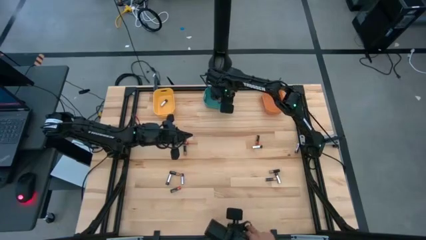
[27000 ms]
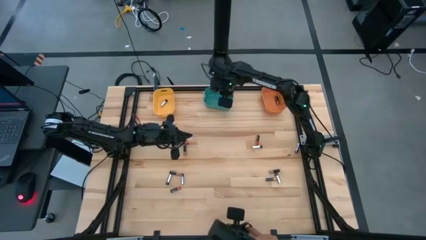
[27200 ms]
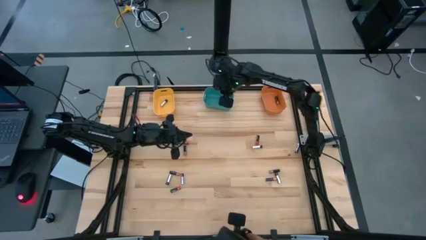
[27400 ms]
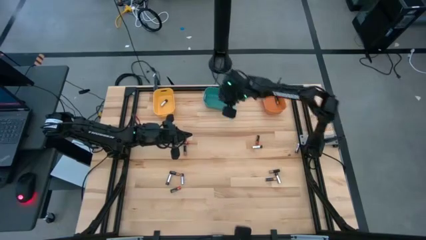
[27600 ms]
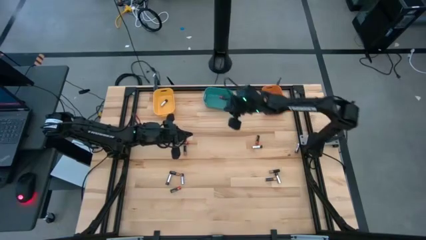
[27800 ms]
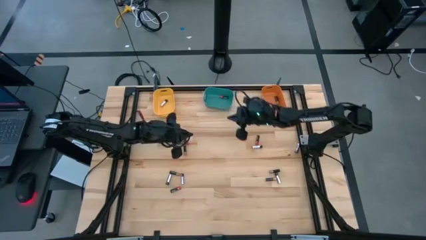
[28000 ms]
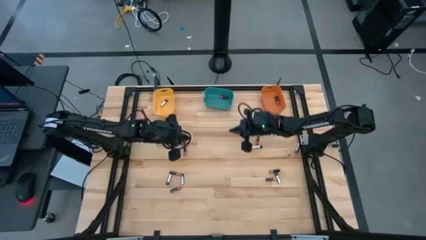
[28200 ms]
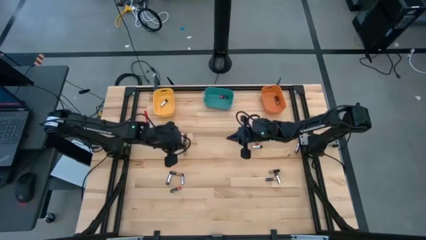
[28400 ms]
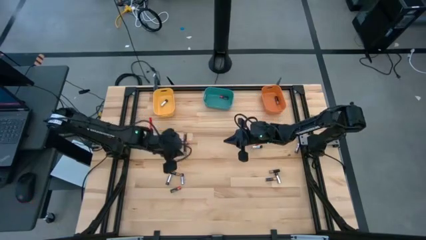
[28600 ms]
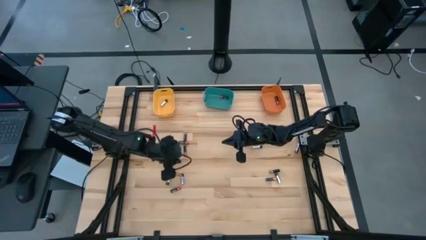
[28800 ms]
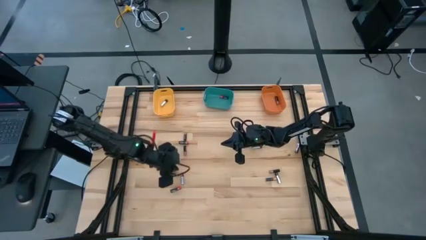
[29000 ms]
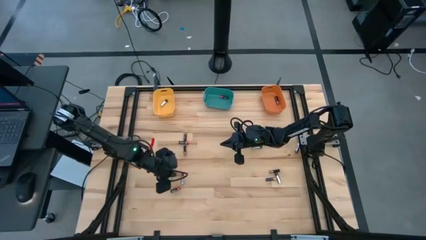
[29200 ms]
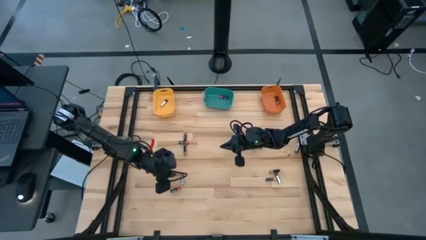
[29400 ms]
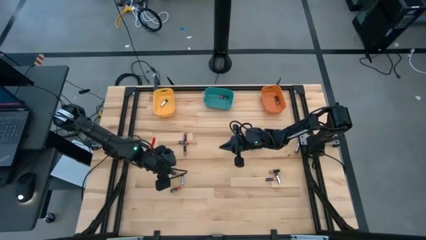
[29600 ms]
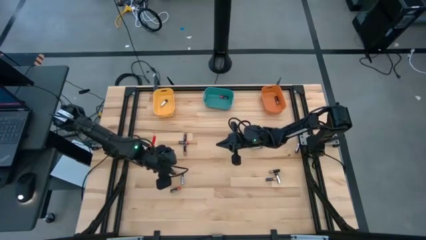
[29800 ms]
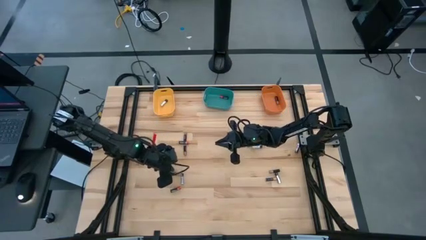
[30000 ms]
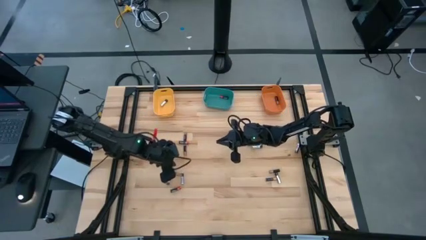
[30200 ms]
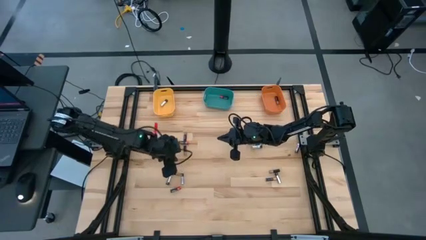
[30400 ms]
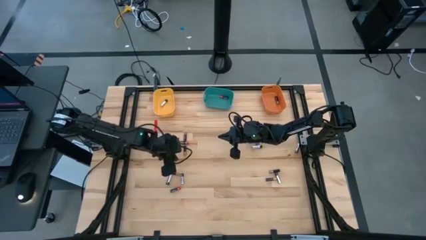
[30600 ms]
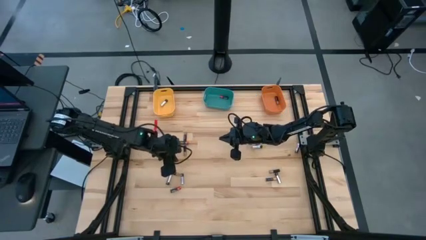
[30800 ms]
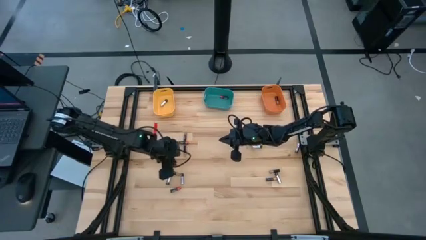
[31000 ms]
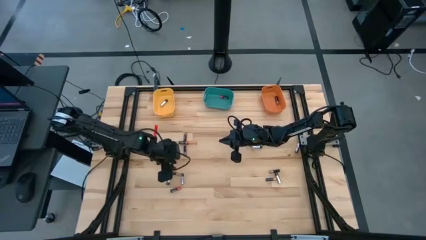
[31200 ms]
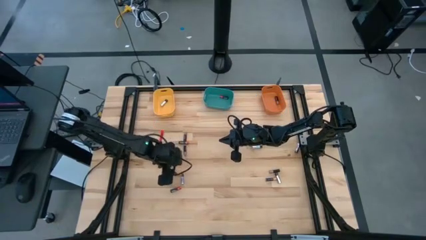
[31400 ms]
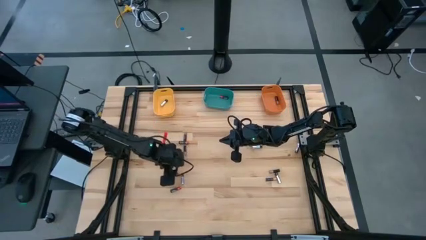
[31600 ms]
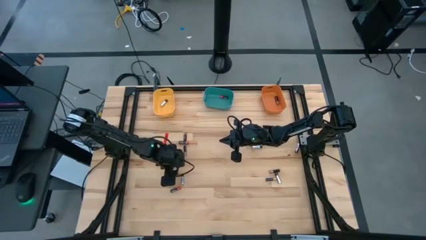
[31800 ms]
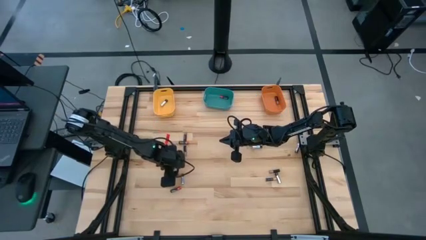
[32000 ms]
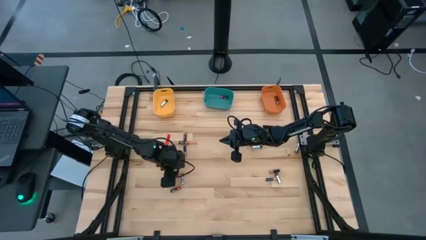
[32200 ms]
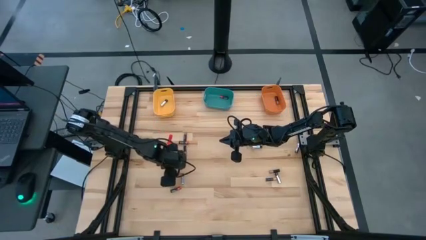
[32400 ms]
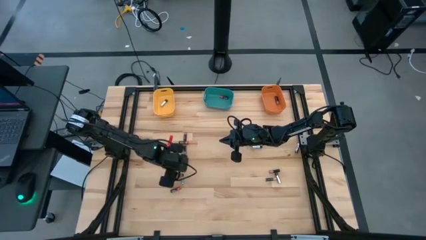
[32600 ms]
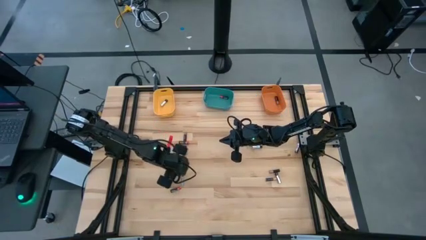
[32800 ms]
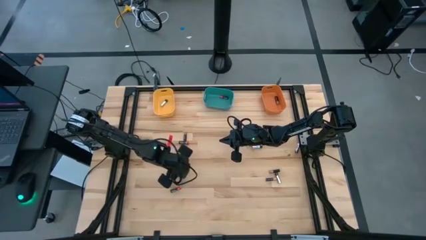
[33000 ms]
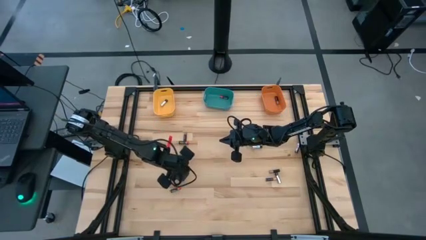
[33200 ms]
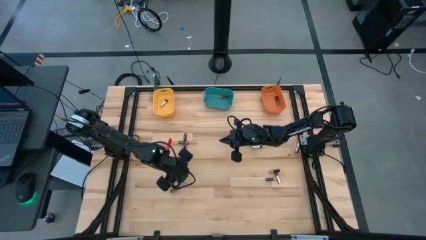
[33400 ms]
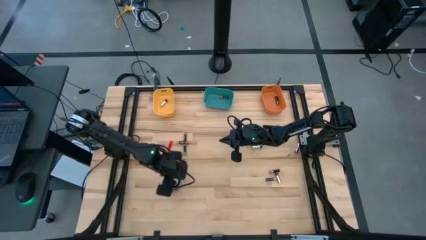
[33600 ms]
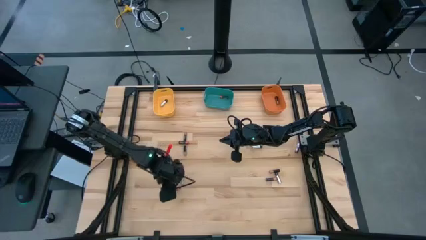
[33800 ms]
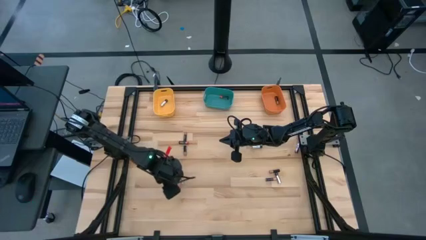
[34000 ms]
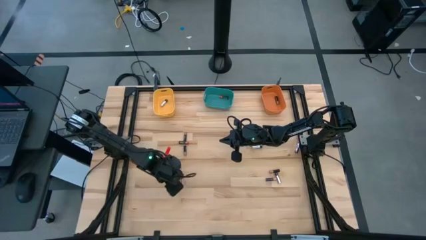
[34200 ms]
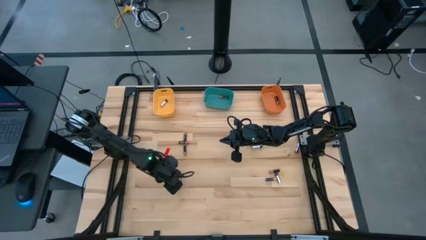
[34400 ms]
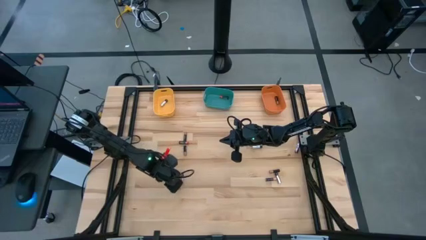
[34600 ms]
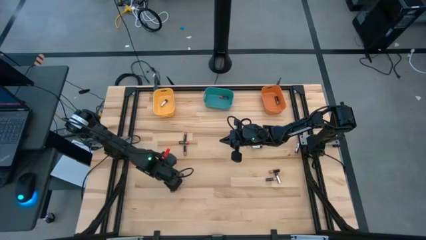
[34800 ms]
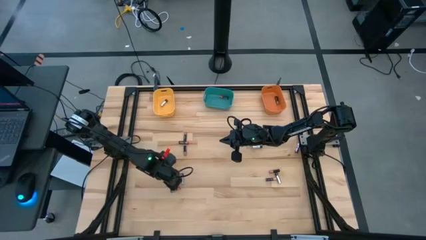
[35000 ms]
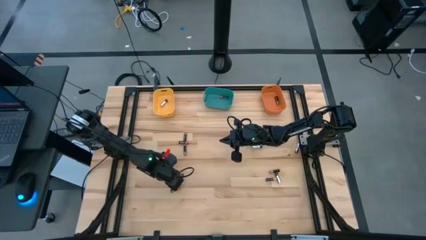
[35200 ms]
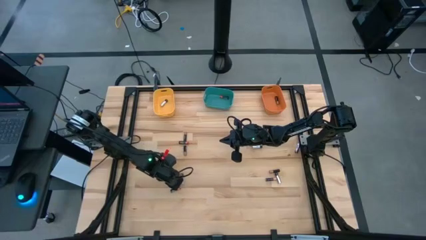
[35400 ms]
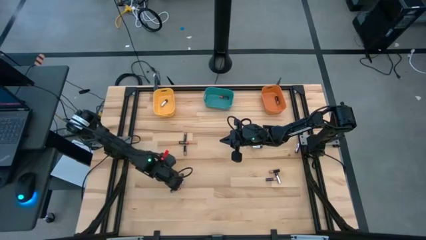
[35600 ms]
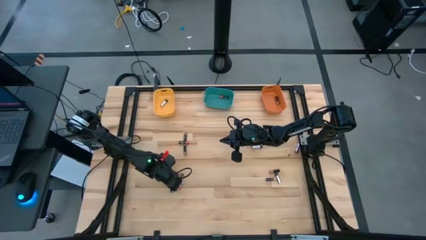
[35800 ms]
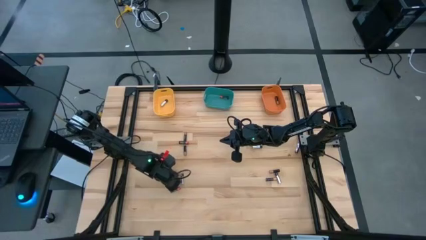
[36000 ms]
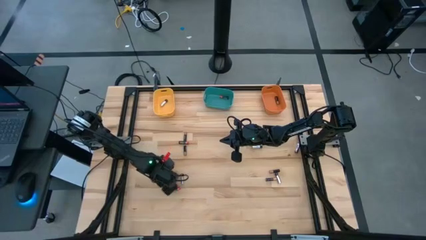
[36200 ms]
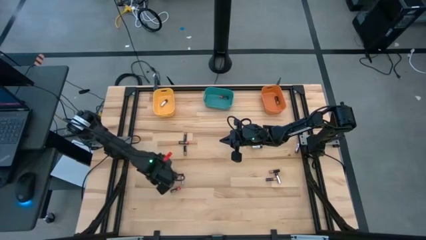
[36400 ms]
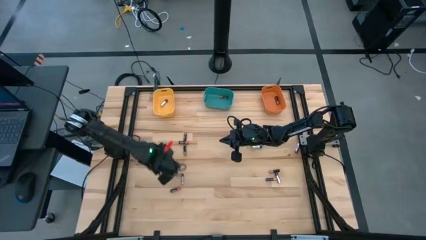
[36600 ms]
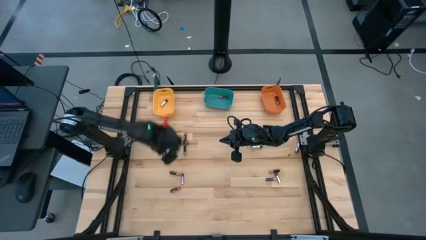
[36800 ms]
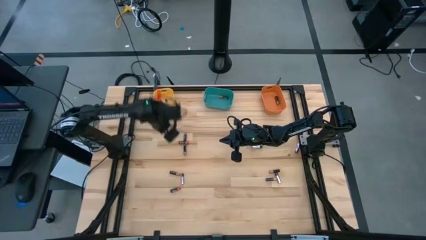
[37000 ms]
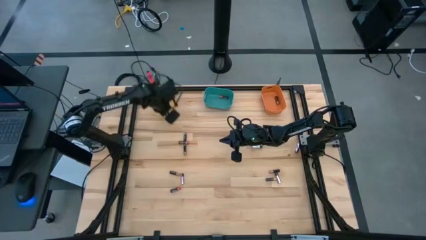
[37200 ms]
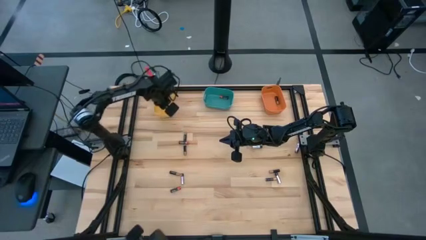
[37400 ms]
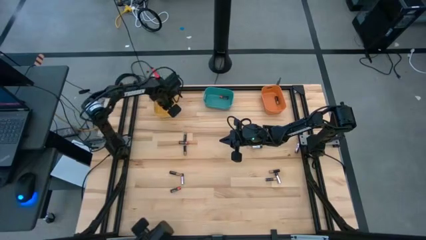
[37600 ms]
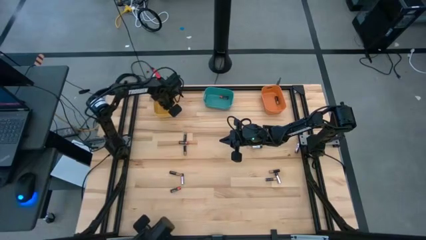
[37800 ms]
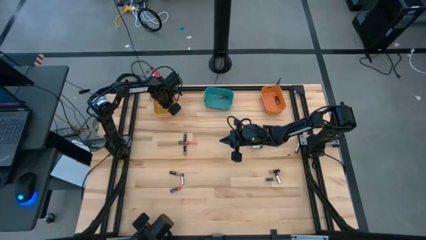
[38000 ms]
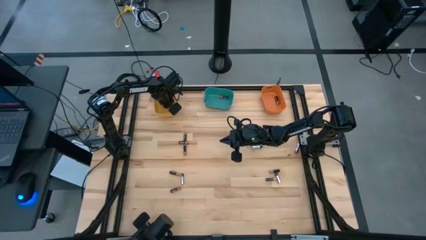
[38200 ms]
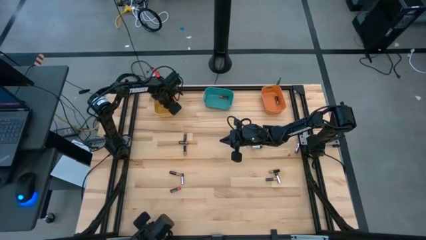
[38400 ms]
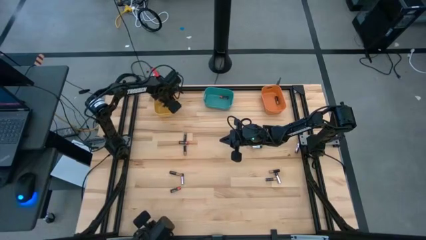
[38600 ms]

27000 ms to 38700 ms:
Task: Sort batteries
Put the silver battery into the yellow bin

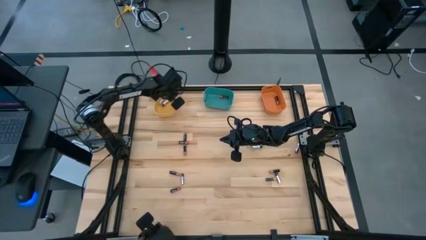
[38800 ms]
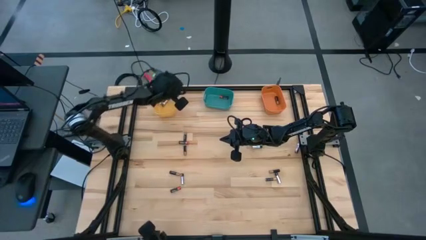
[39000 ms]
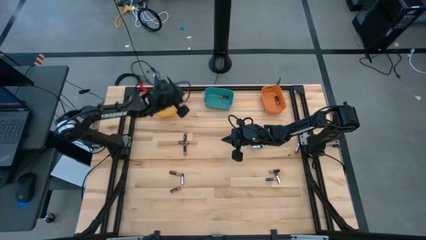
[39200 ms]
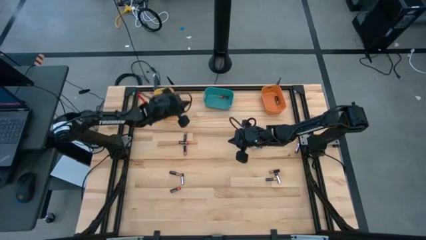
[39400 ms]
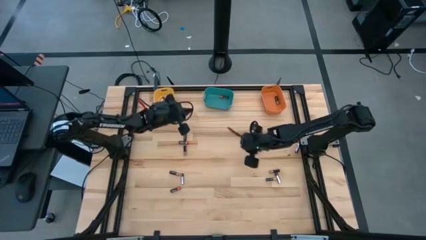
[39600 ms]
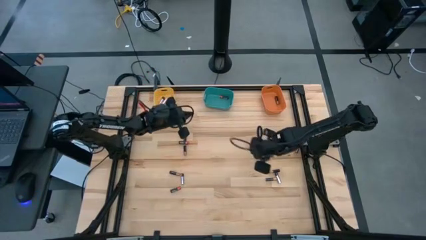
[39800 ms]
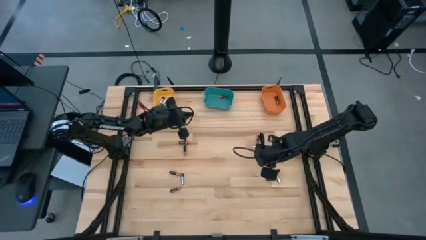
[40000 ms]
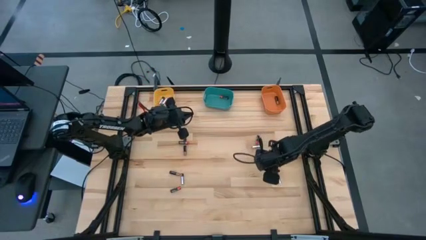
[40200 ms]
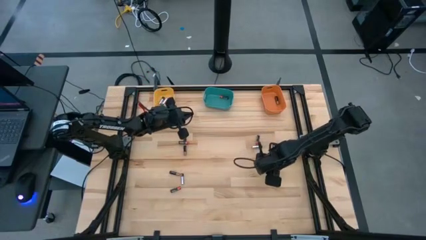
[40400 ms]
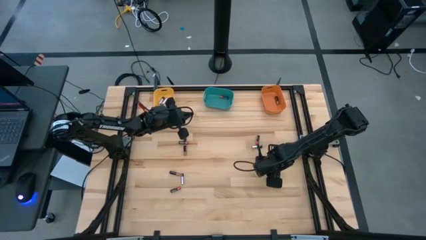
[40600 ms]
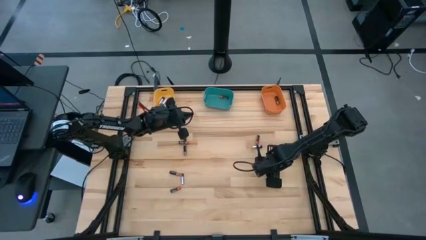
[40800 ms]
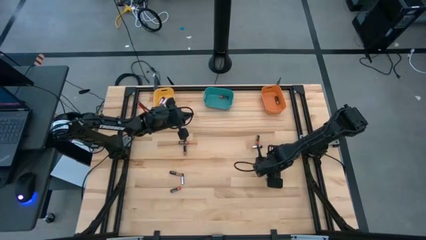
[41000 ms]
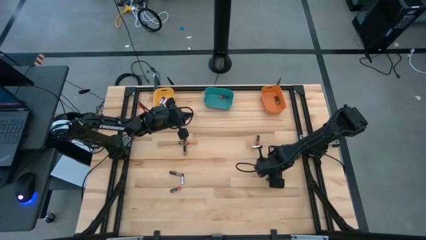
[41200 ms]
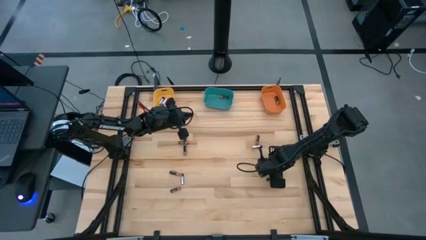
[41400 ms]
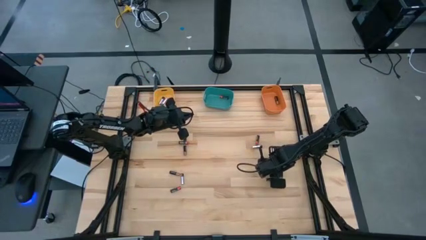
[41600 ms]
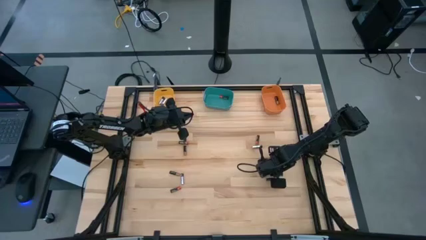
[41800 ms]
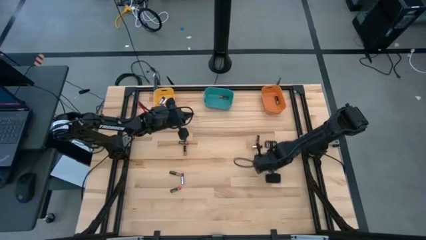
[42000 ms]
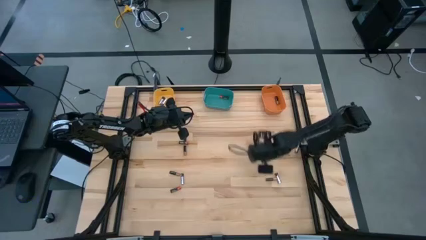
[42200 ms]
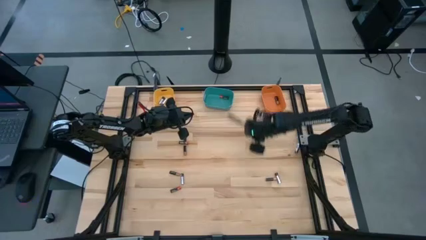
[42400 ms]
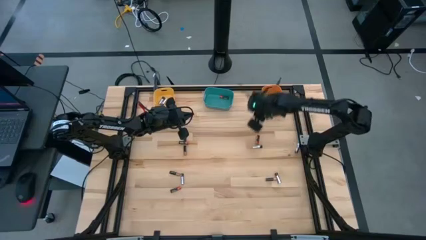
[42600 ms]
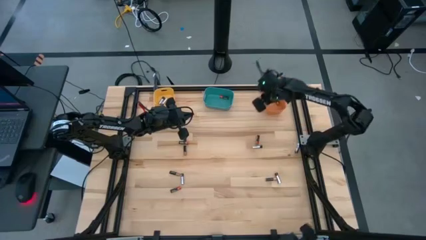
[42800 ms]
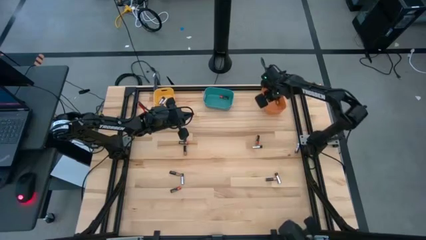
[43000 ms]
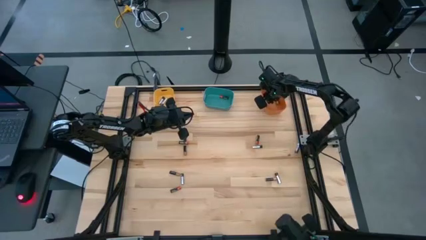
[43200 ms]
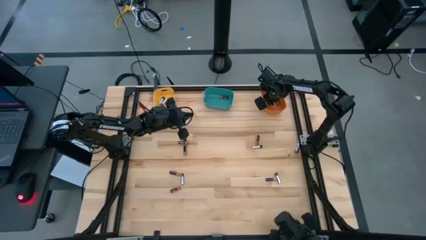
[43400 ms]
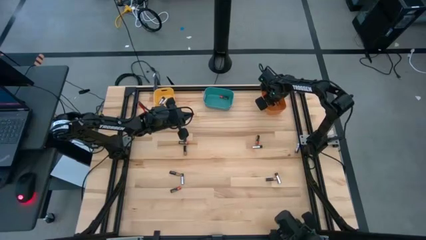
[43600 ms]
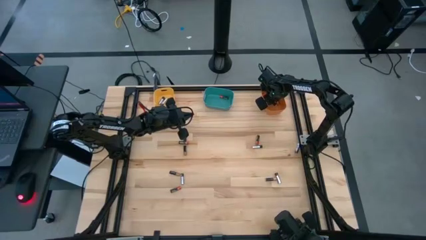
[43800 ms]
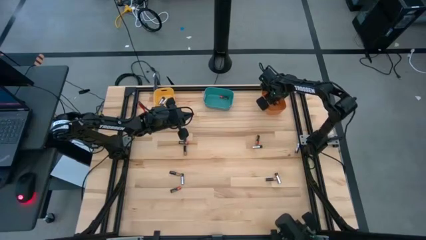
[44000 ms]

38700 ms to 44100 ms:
Put the brown battery into the orange bin
